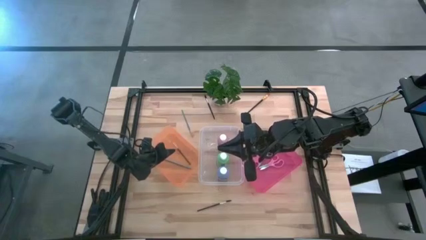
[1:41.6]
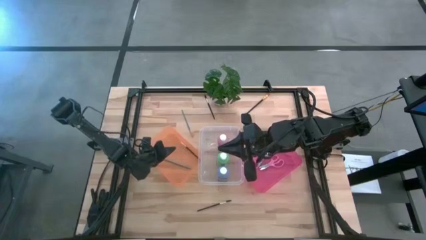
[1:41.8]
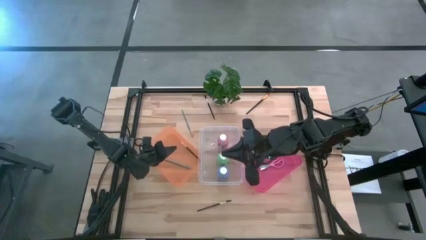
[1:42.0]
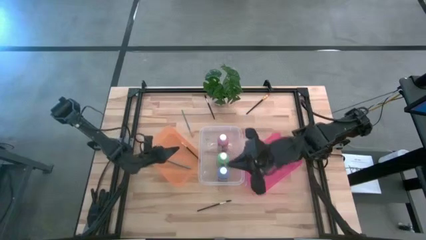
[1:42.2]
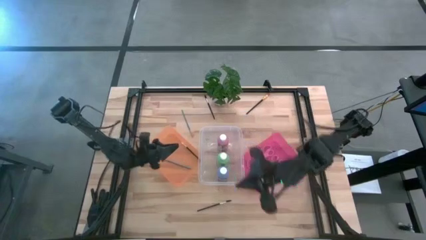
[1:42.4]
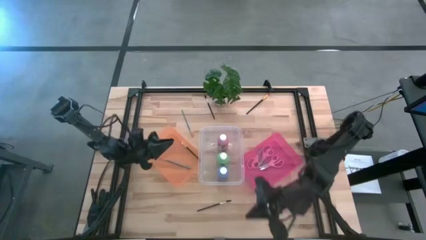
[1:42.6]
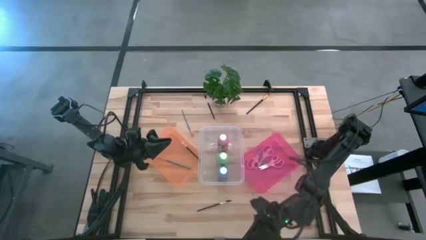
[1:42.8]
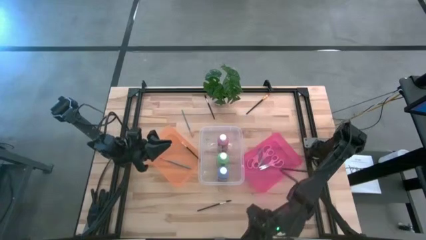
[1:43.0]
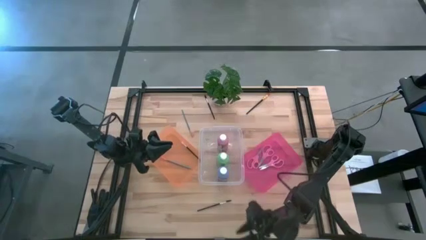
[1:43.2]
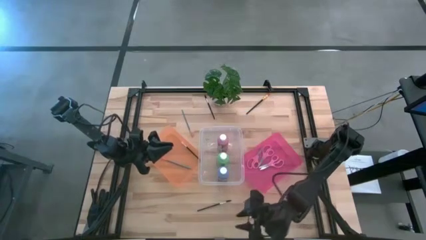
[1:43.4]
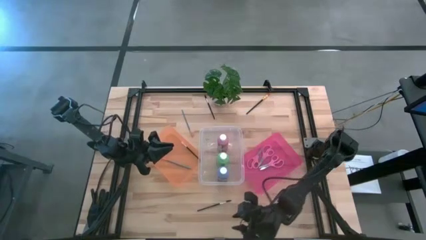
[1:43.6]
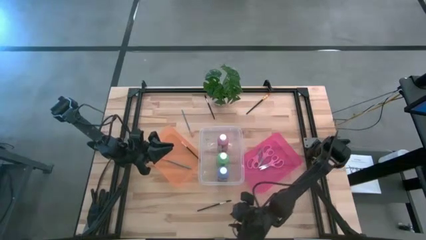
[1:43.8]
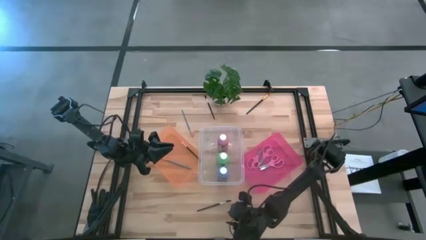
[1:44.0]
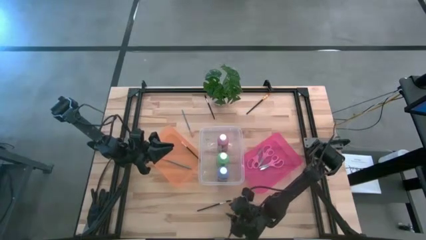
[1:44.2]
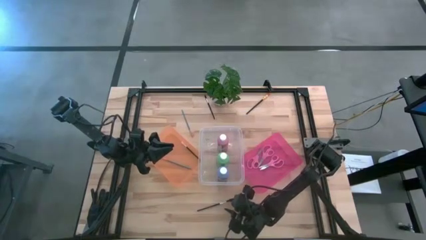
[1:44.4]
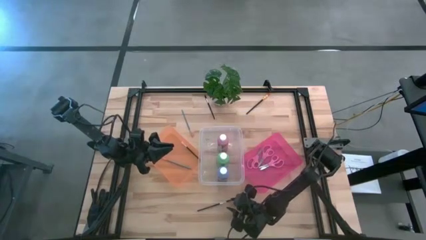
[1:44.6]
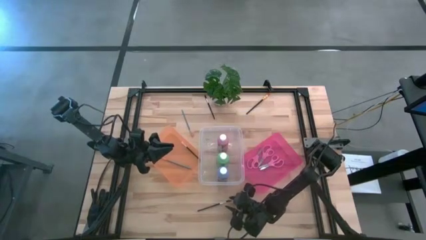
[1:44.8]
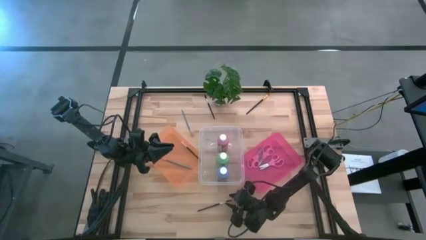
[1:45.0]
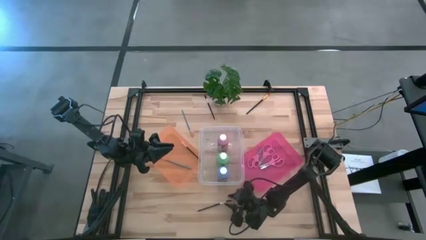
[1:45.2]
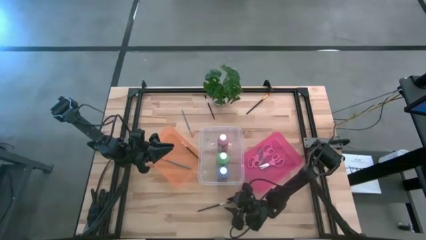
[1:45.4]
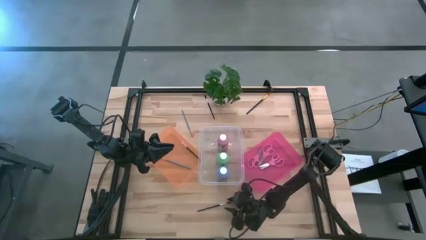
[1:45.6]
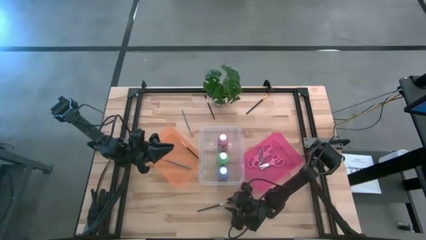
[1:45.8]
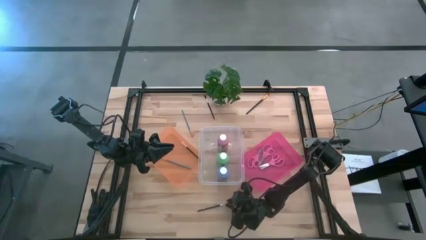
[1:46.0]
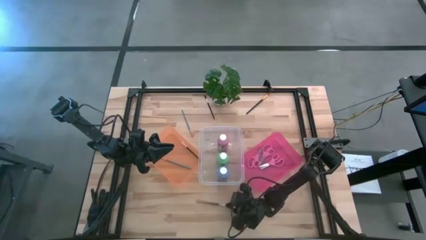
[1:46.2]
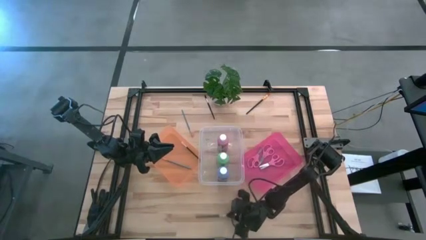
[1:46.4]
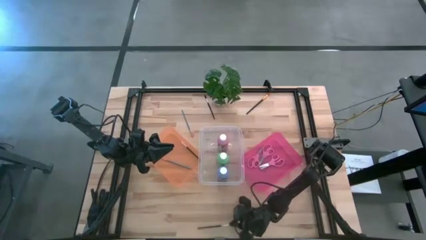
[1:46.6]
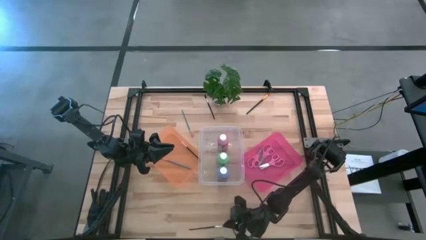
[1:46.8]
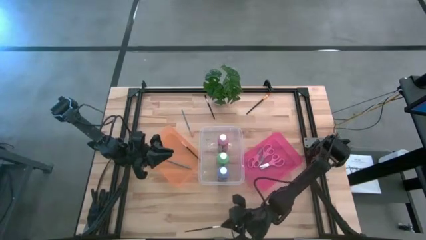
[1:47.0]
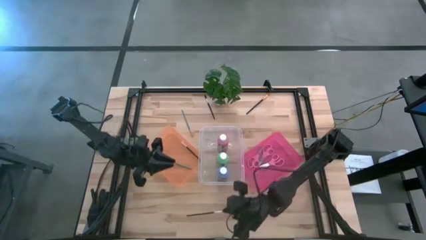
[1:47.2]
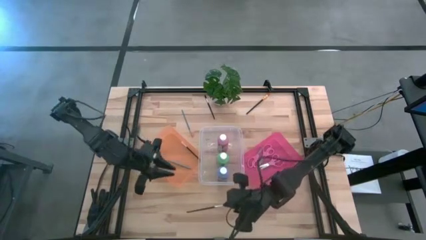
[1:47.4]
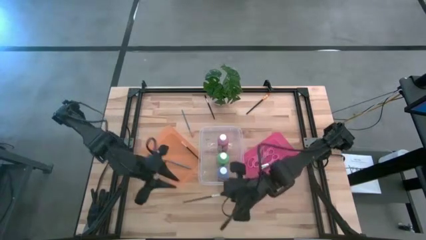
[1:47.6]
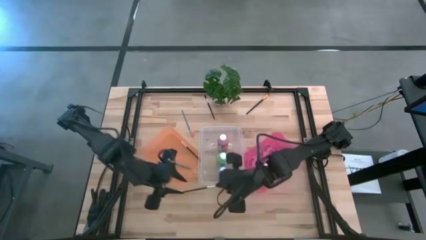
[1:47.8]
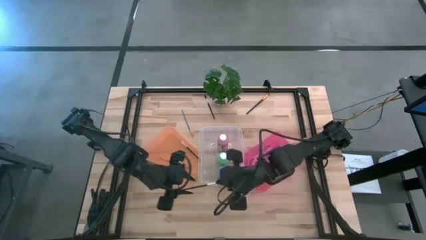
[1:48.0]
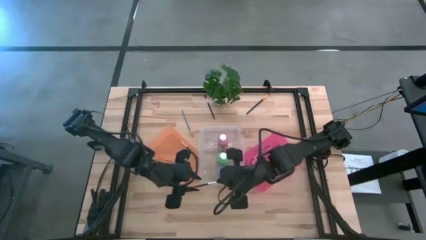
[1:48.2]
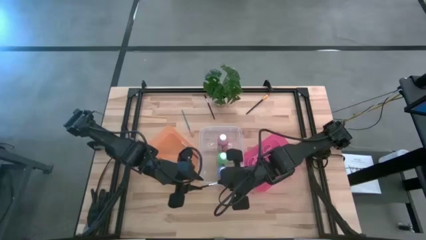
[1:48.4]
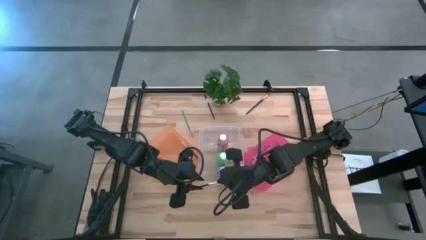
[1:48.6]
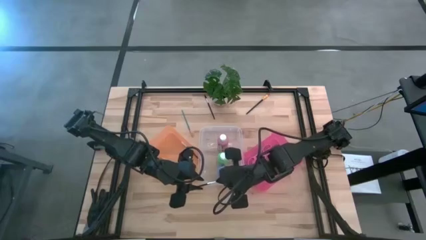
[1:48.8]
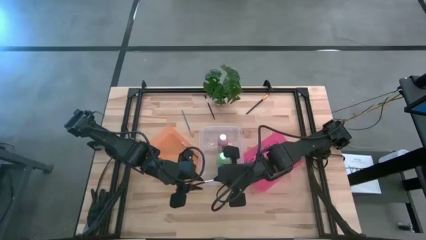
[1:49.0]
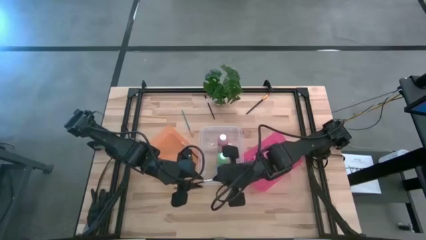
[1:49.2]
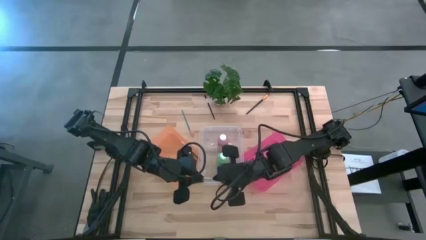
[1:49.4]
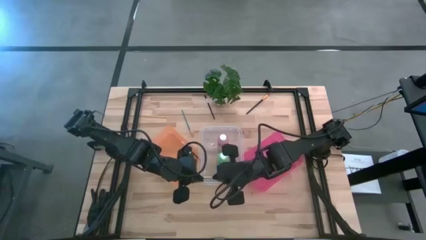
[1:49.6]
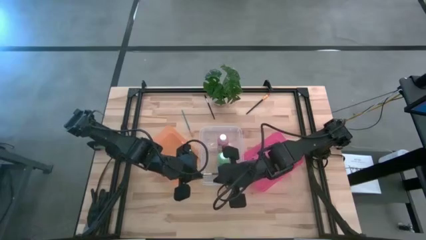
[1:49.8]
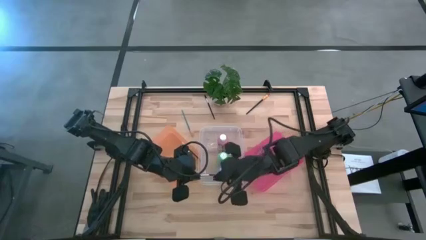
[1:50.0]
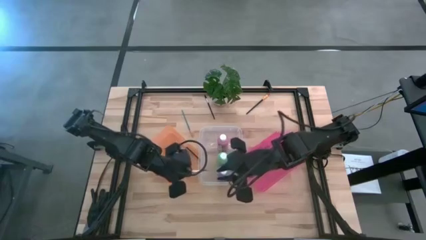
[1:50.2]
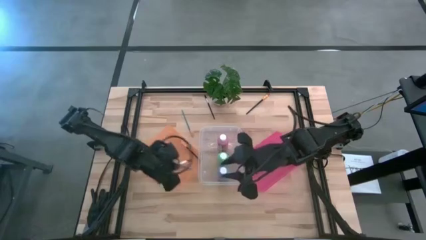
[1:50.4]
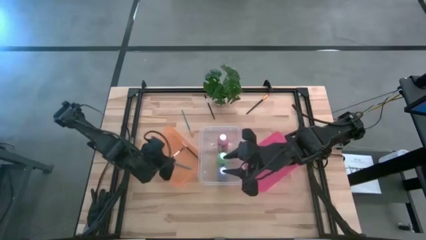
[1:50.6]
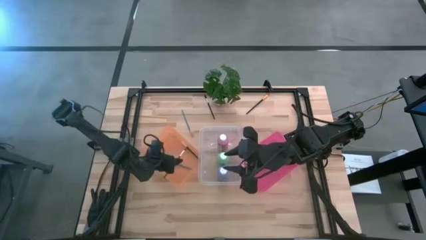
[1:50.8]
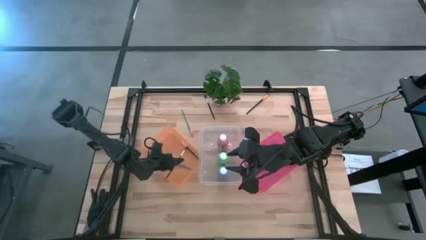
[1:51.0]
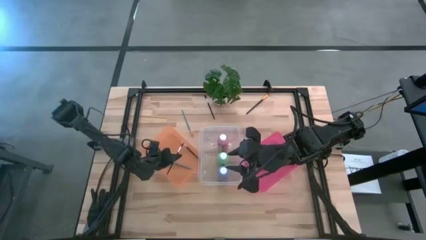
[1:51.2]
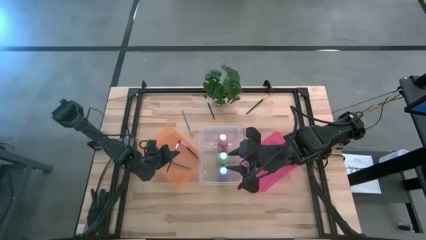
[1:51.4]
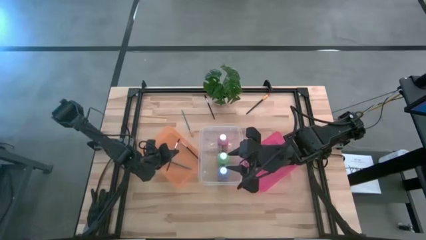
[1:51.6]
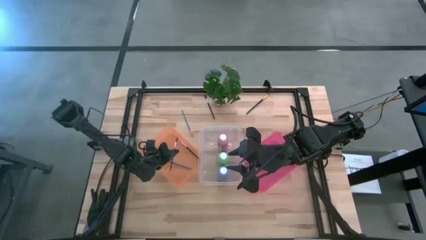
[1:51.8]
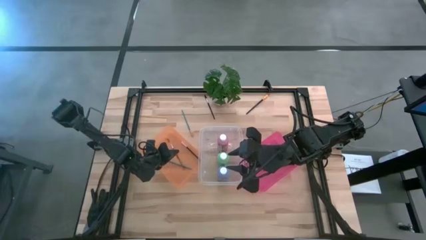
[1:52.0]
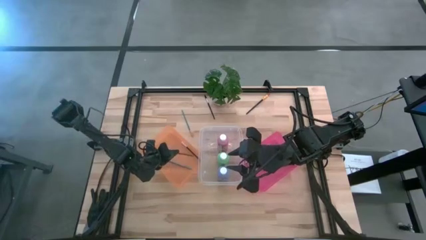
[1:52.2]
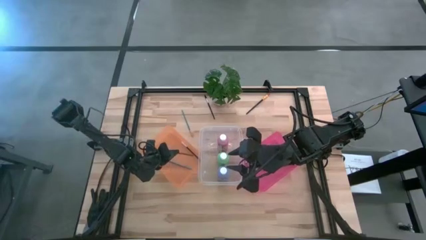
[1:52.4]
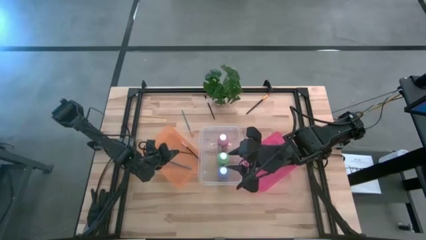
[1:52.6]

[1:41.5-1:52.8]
Task: Pick & Place Paint Supplies
Put the bottom black lash brush into the orange bin

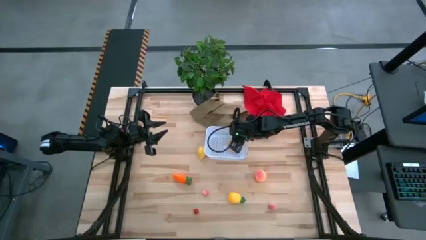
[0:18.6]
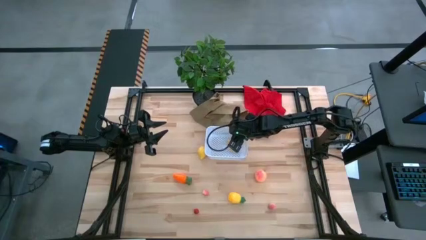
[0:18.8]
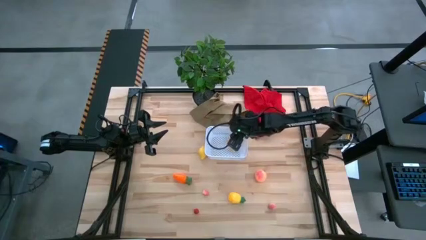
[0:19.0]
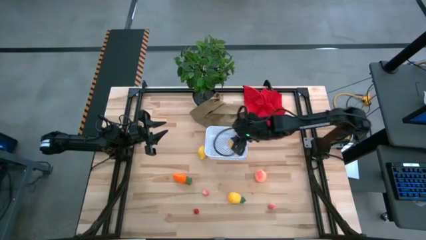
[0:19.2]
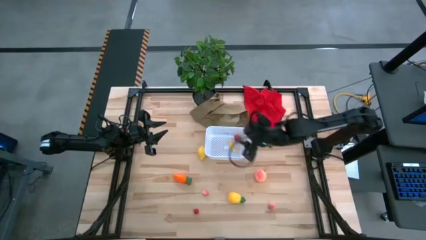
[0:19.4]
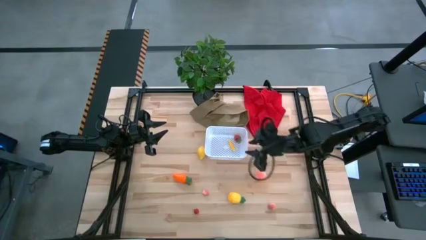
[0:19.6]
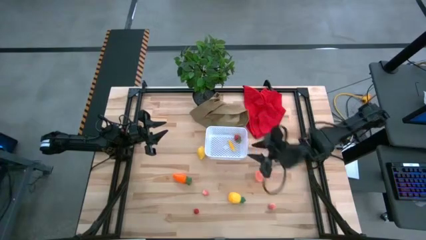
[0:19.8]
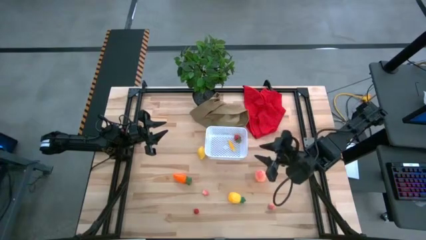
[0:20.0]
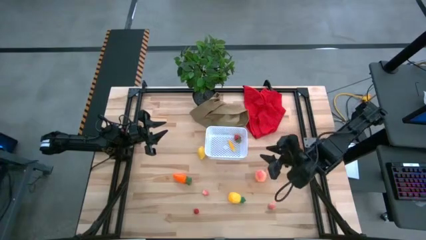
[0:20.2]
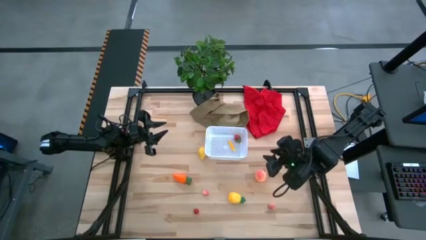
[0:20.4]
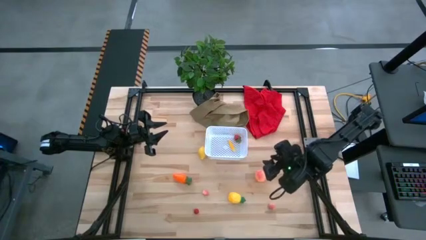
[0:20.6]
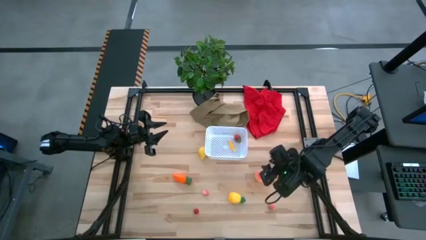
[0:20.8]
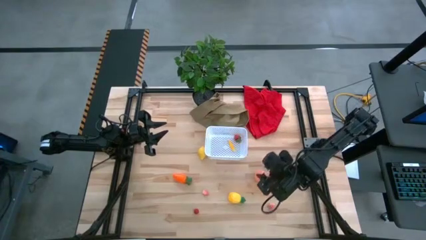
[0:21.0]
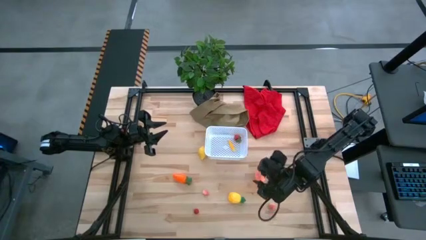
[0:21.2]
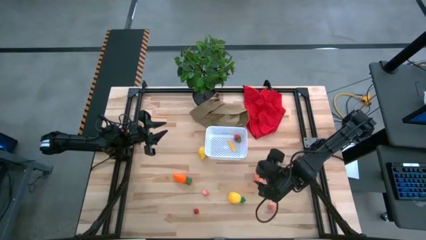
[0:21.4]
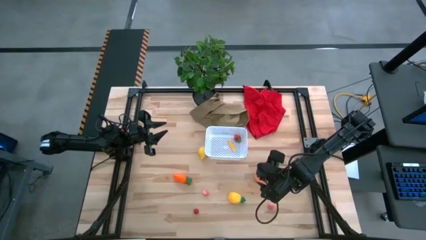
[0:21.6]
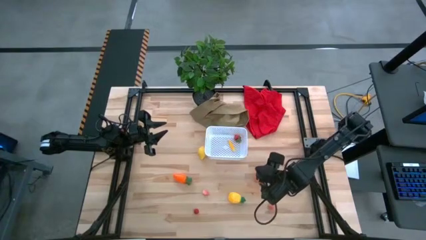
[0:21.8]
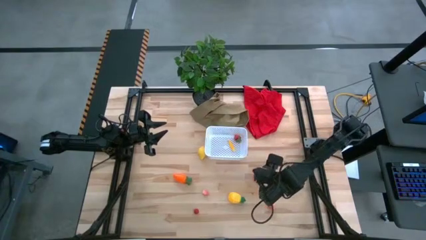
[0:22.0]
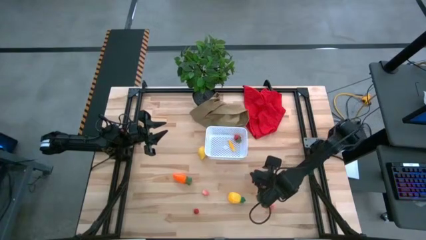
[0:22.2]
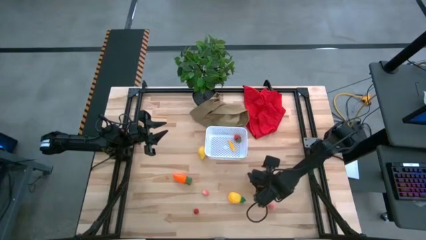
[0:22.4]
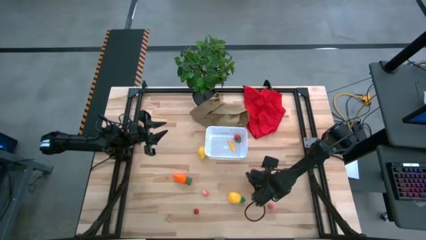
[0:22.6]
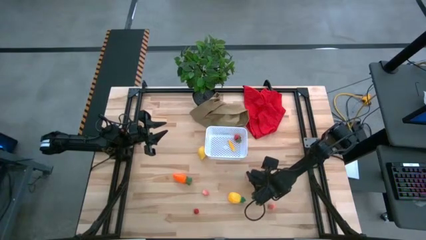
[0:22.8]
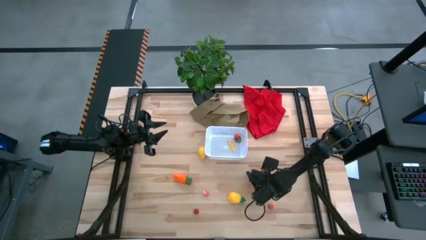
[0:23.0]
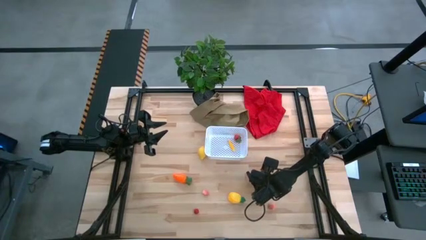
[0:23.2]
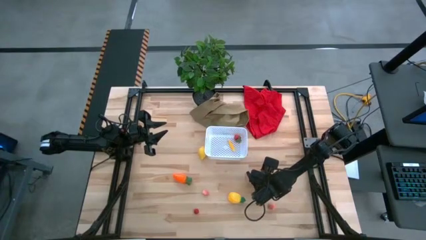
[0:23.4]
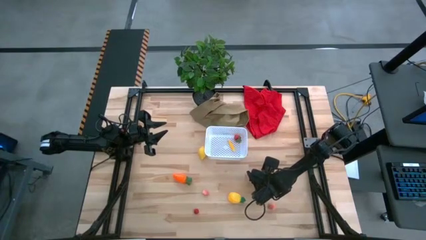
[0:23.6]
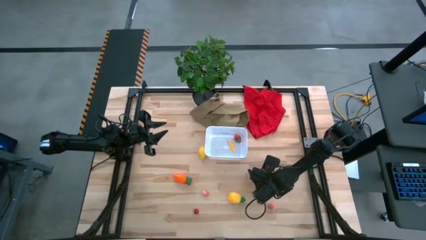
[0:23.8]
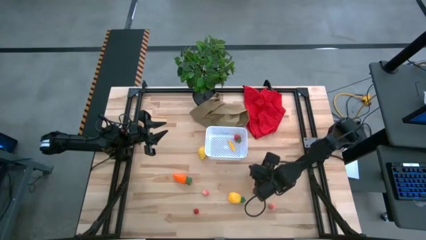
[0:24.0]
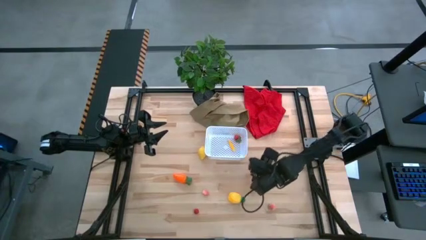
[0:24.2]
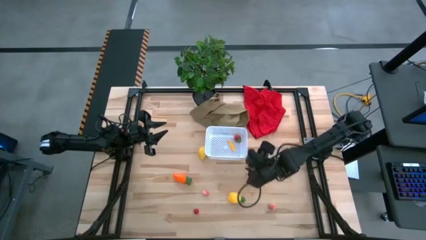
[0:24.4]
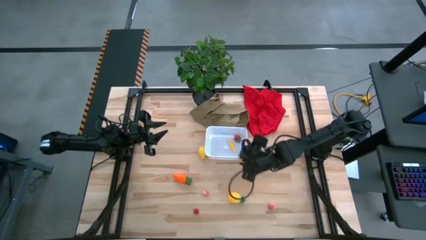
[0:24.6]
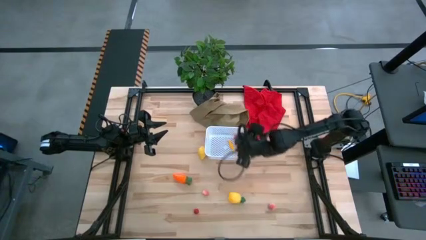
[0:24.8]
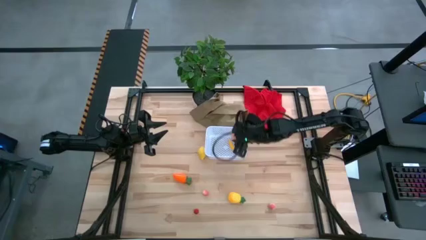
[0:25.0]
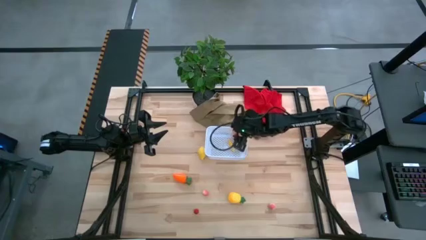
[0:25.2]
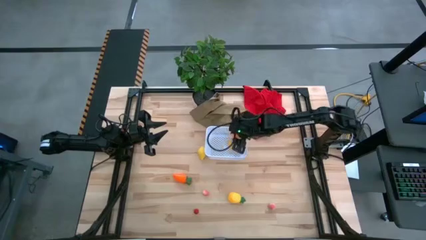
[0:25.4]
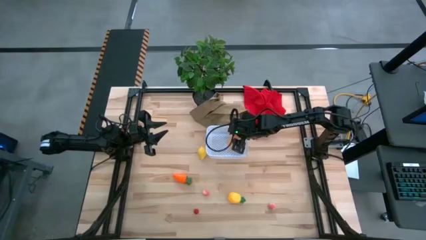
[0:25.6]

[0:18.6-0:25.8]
Task: Pick and placing Produce into tupperware
Put the top pink peach into the bin
